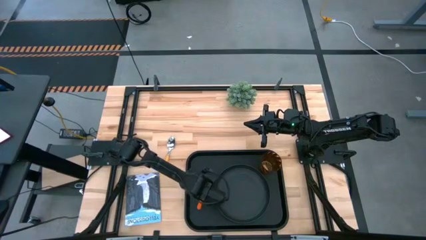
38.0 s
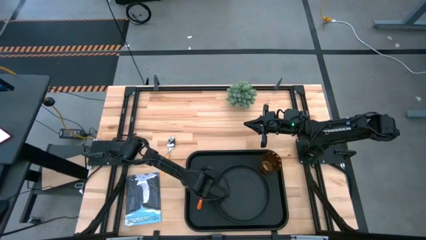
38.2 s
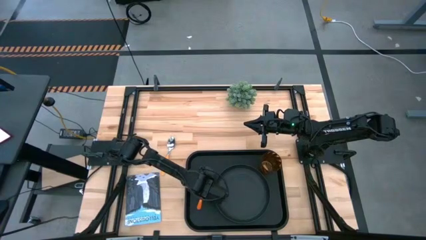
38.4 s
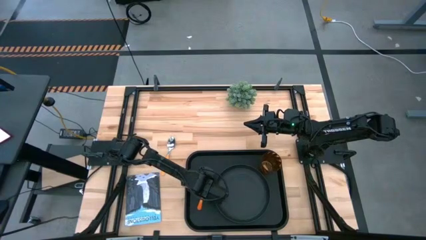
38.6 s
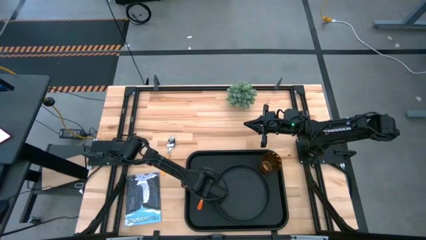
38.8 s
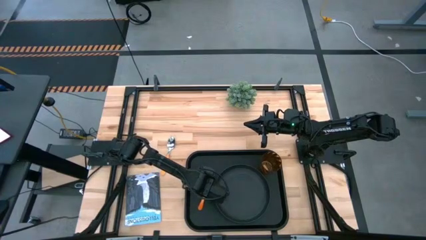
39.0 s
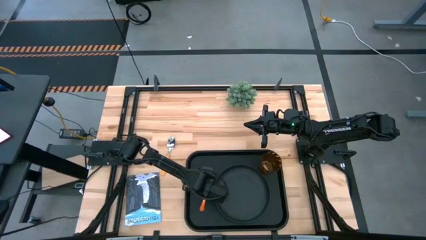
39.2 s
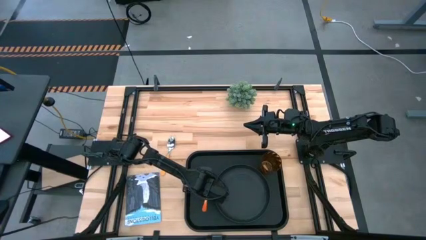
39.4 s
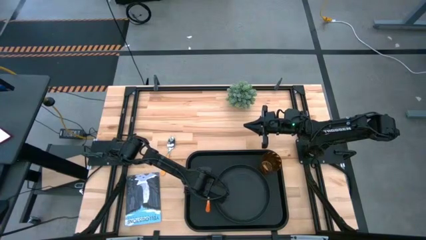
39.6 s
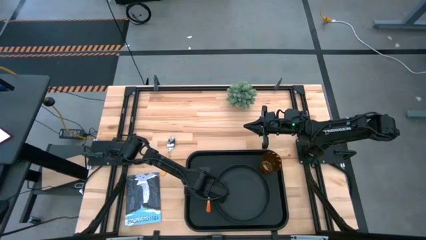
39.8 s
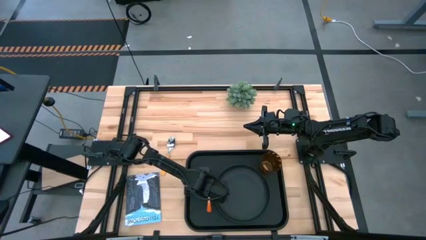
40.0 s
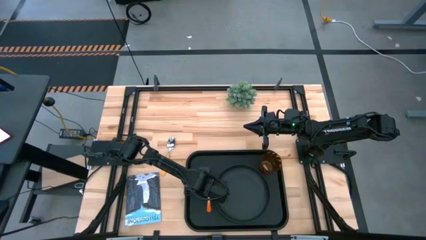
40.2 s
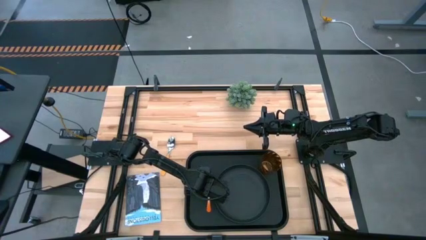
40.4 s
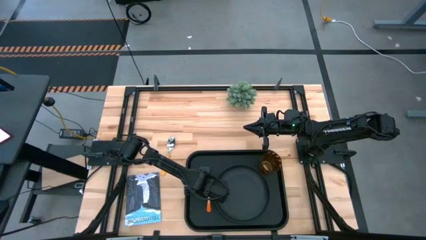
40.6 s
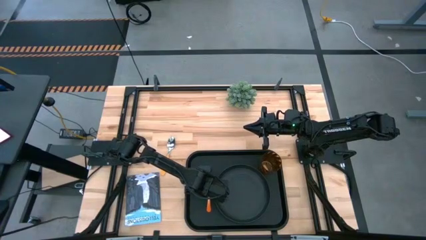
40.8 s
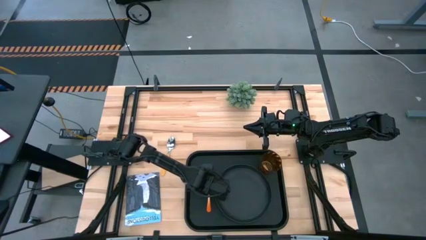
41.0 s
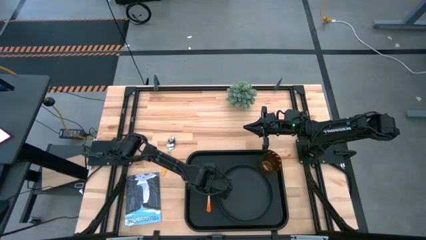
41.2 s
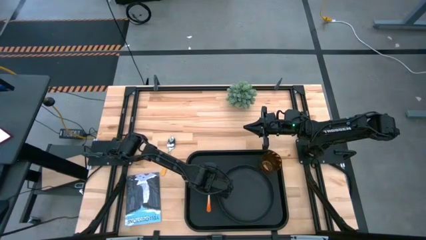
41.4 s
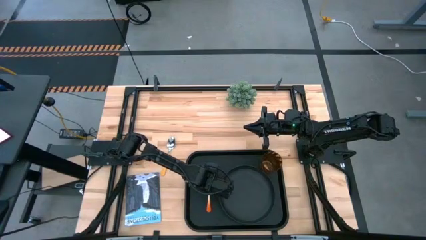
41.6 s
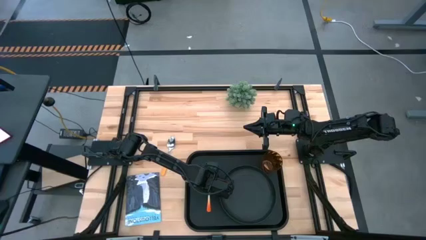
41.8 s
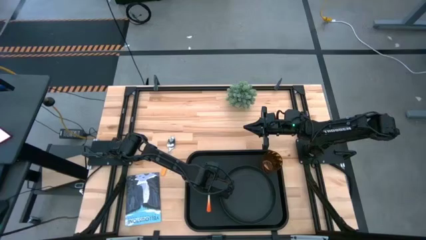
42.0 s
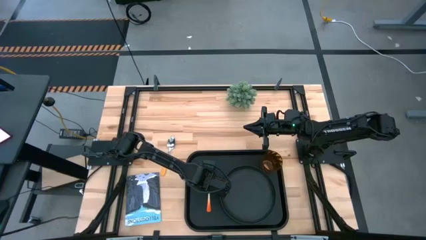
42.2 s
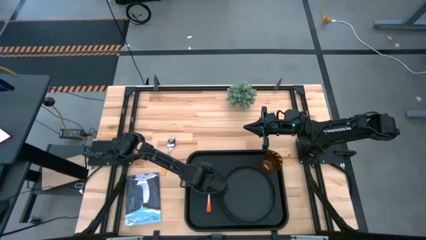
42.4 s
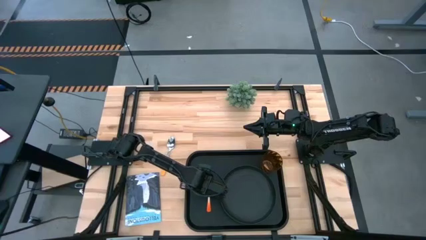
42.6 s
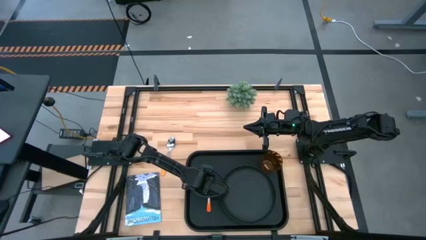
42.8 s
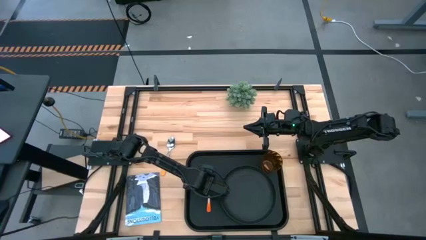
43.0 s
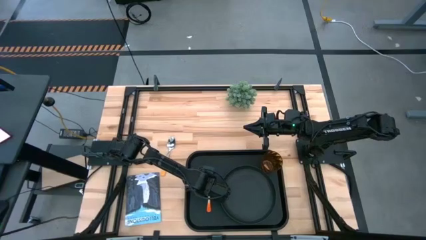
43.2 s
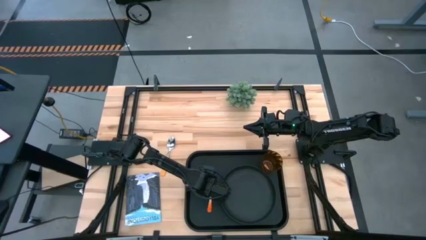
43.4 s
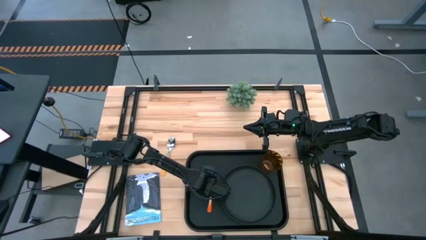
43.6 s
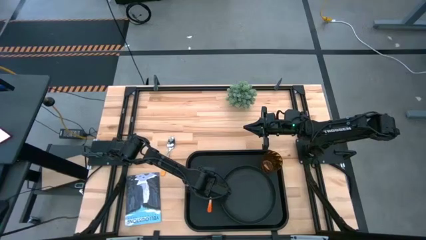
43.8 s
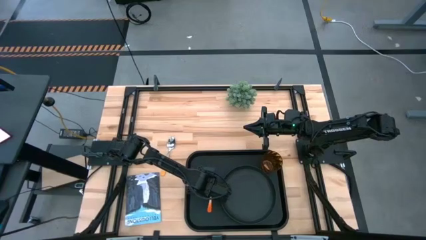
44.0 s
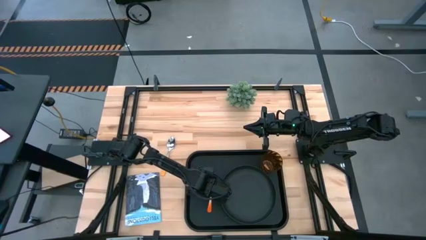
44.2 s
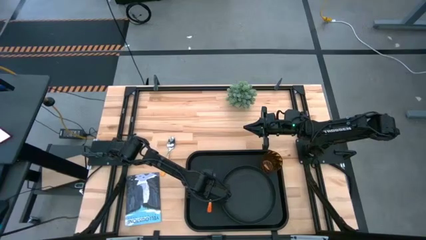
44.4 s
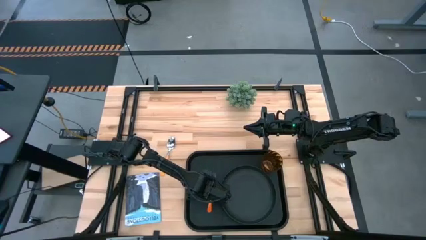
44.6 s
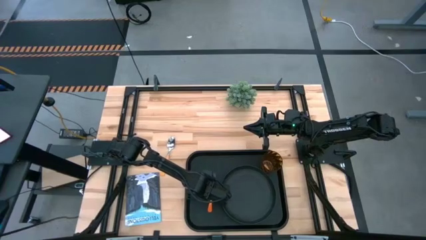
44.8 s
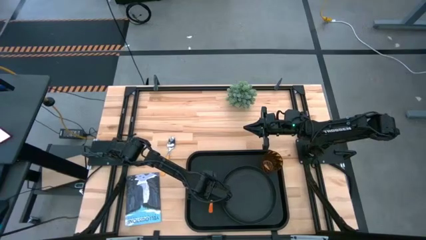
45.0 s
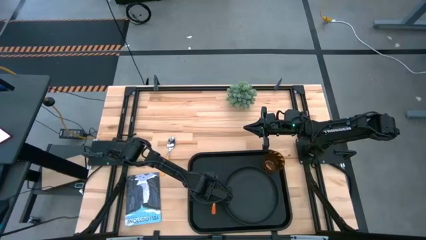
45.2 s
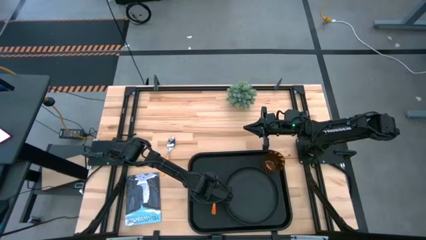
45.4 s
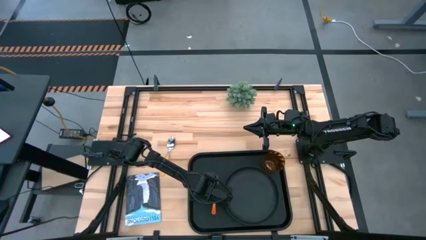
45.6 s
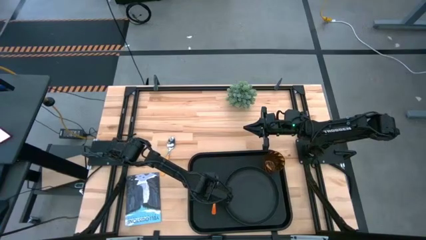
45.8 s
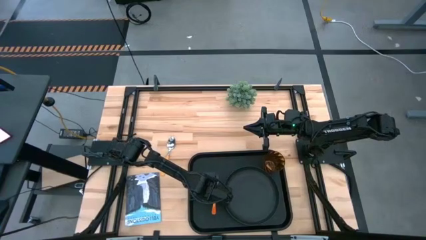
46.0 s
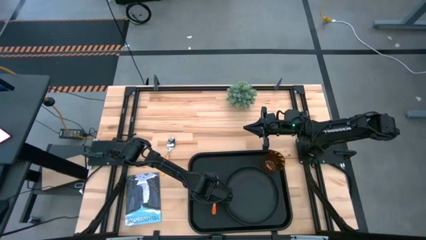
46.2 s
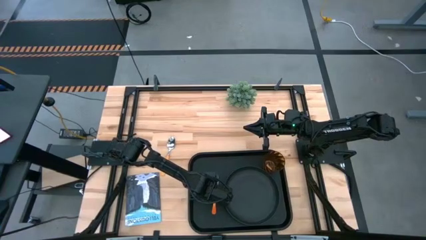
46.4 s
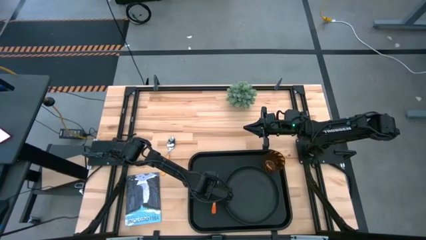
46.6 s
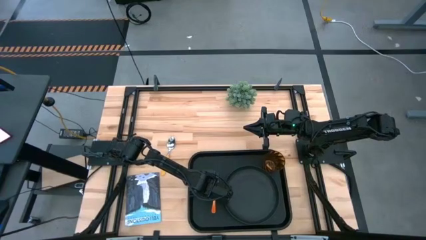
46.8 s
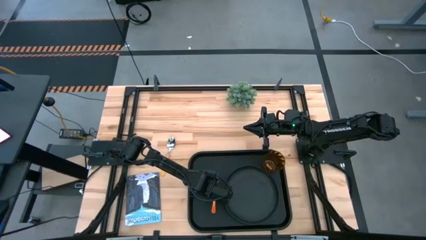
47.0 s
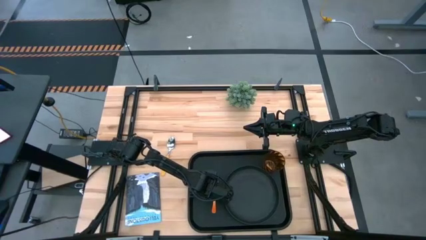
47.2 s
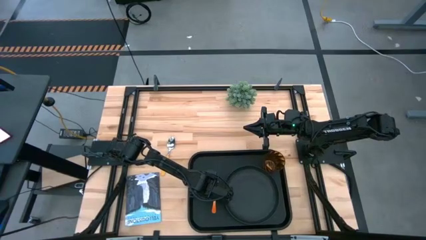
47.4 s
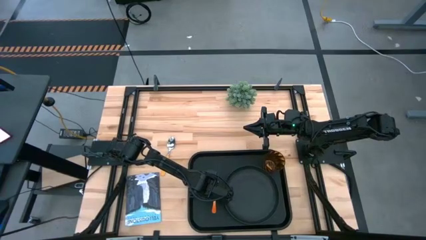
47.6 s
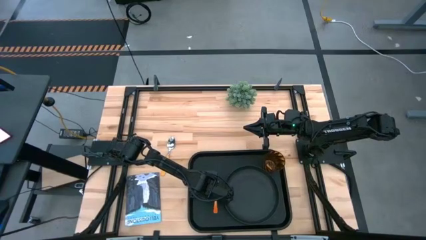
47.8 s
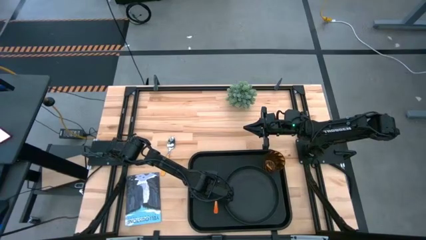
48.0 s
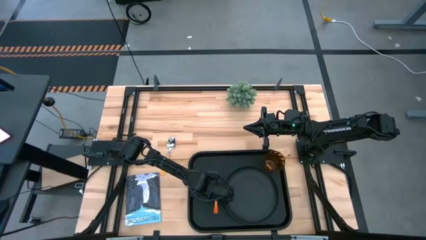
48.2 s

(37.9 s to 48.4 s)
Task: Pick and place plate/cup/fork/spoon on tray
Put the orange fork on the black tray to the right side of black plate

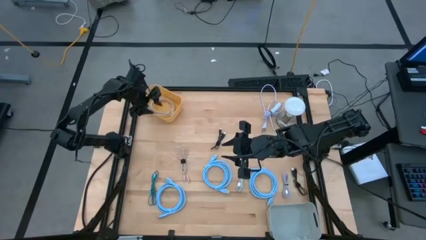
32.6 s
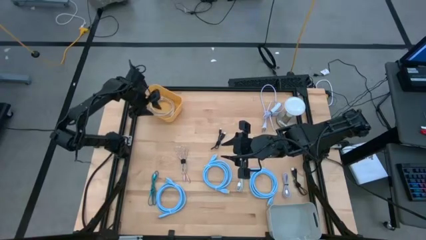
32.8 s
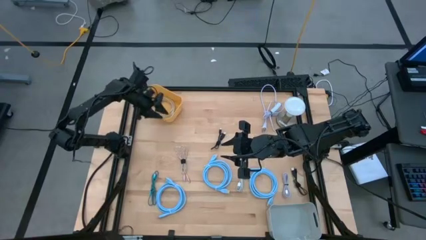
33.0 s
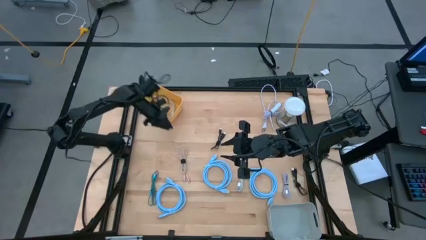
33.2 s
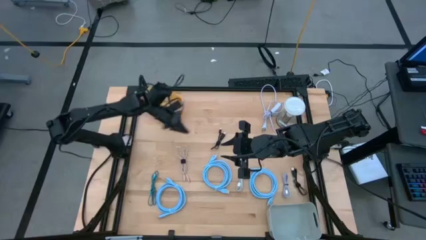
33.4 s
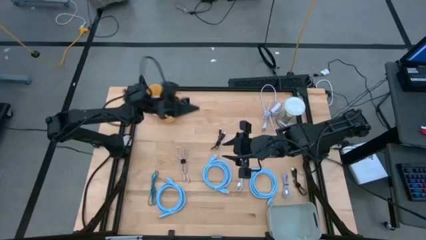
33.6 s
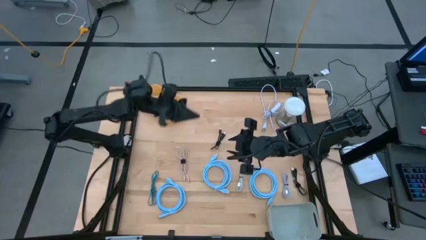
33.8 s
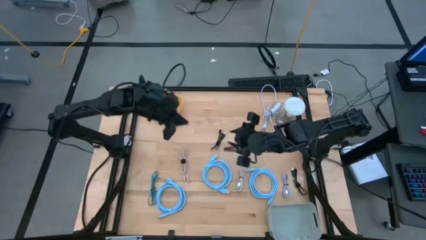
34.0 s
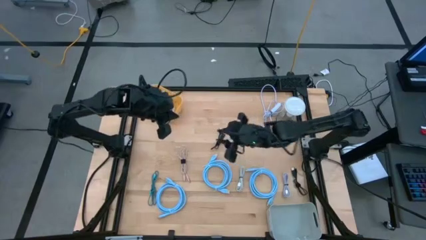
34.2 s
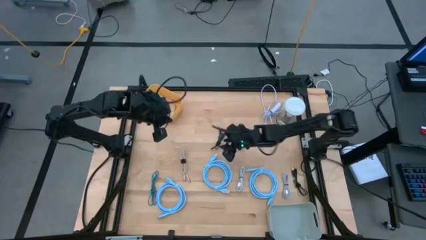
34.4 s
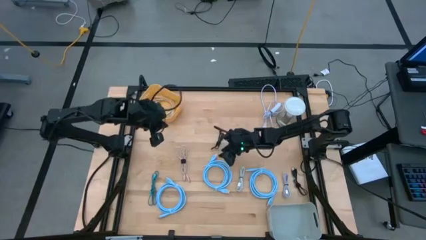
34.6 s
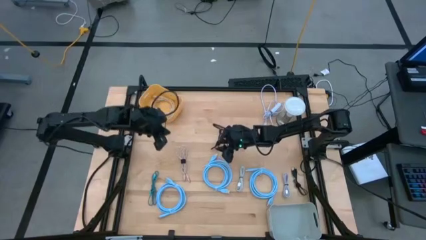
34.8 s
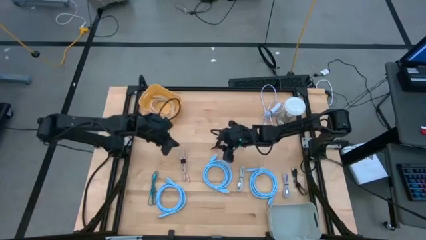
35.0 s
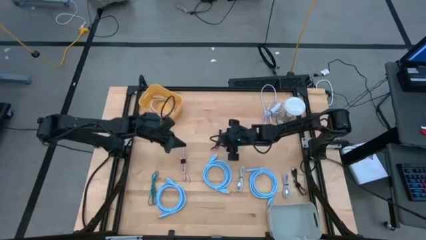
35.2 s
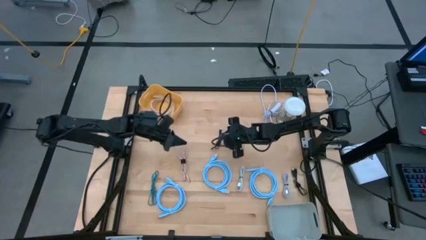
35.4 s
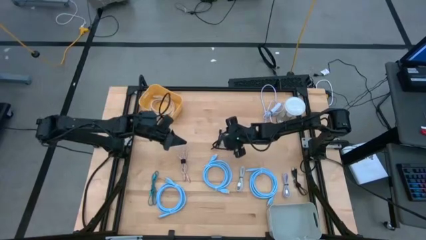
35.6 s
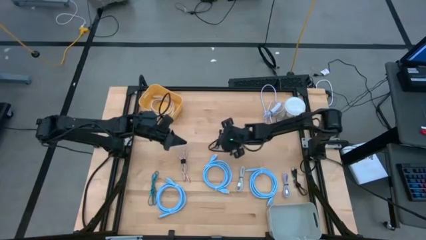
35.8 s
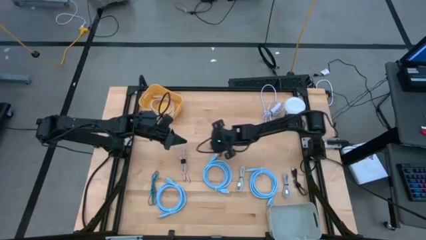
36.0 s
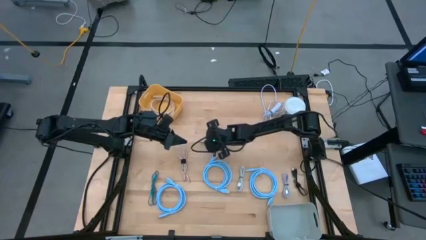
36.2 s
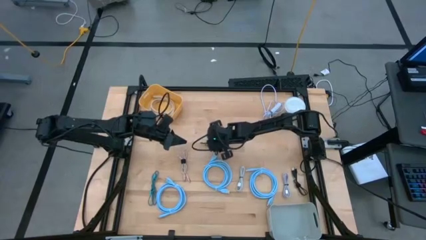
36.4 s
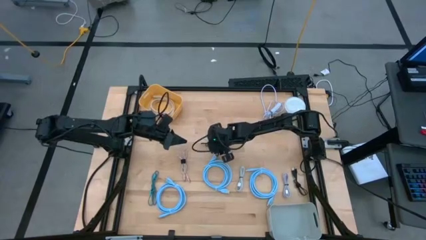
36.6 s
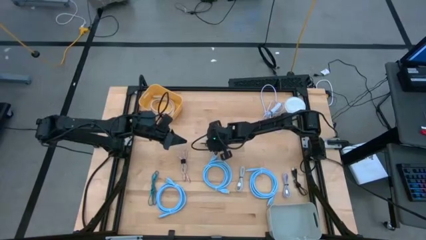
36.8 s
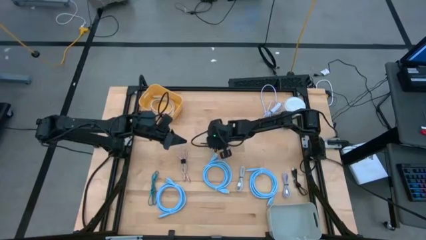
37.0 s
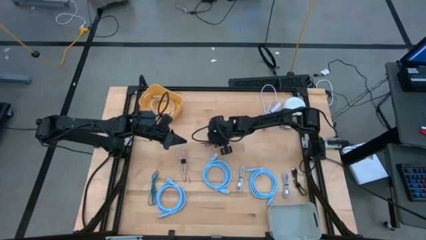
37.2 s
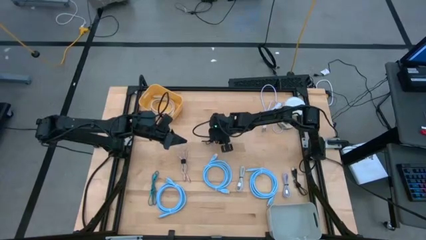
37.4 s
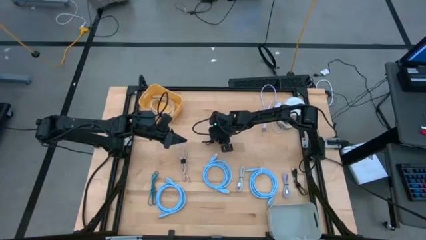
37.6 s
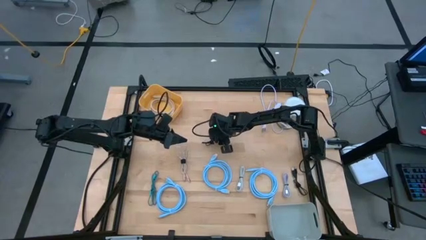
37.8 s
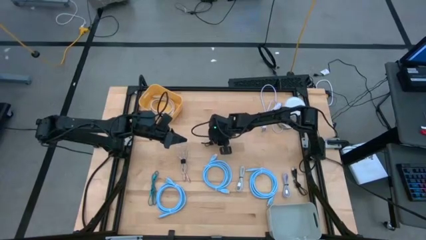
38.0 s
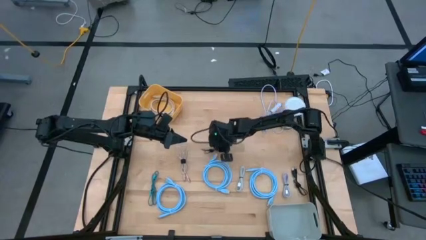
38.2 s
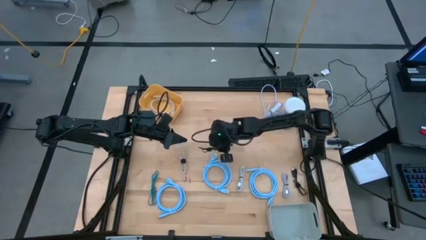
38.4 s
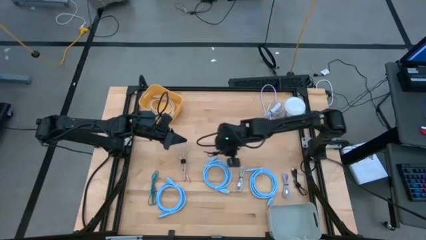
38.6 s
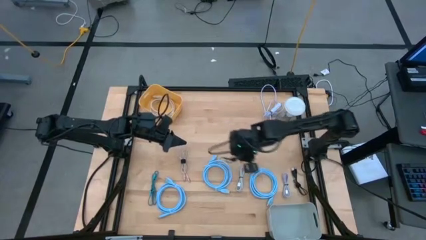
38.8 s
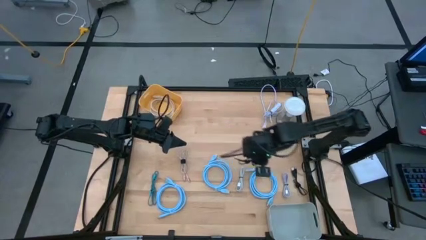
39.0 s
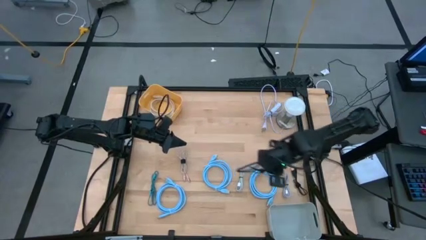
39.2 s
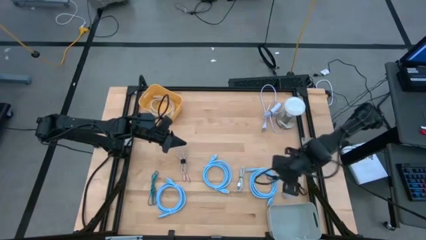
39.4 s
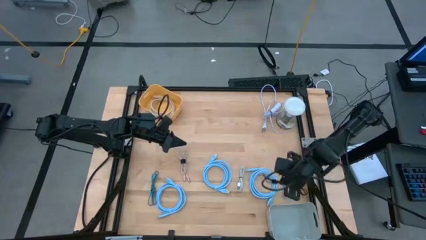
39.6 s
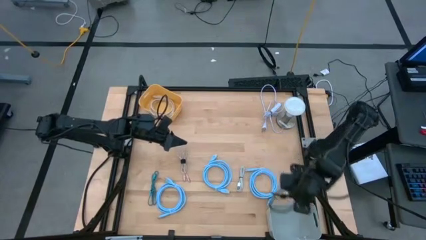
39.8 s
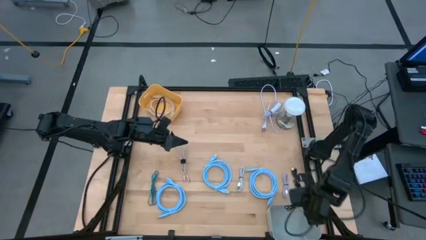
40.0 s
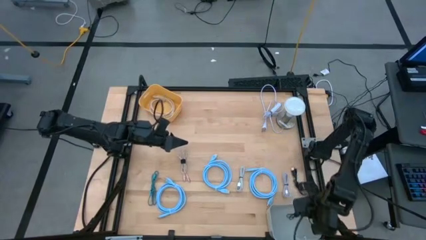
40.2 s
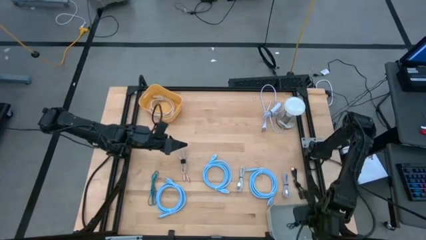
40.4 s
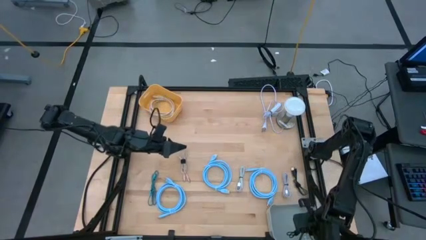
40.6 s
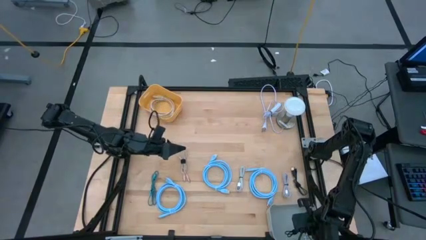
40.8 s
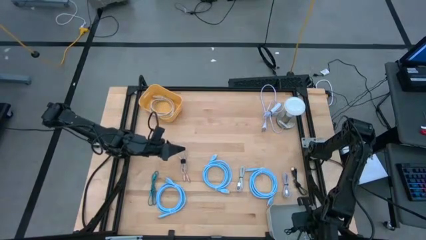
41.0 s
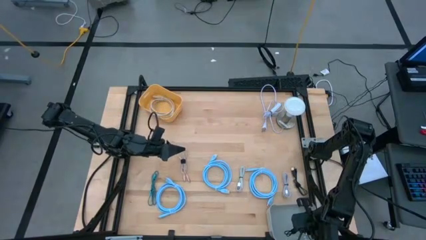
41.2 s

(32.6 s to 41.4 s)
Task: Pick & Place USB Port
Put the top black charger cable into the gray bin
